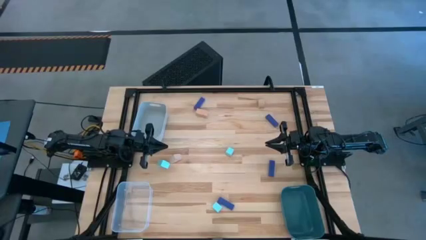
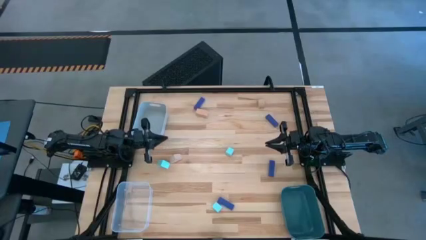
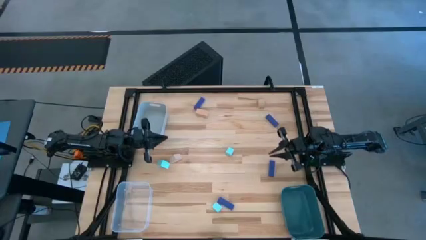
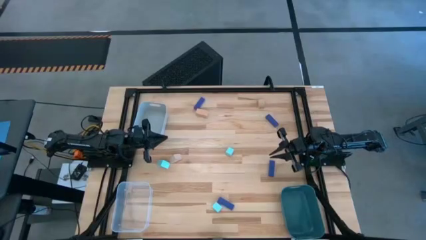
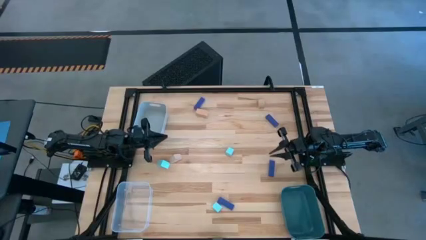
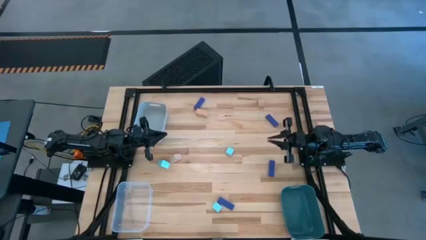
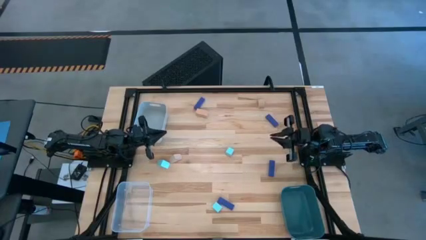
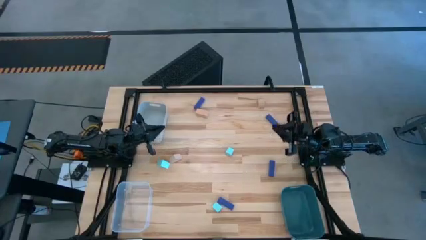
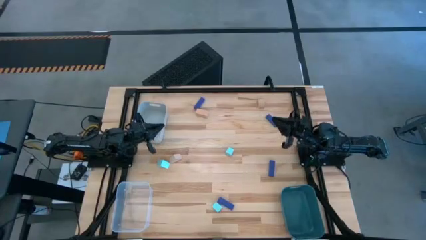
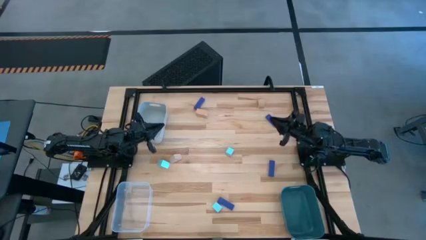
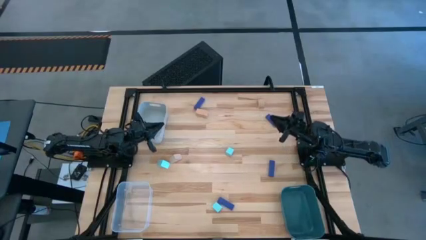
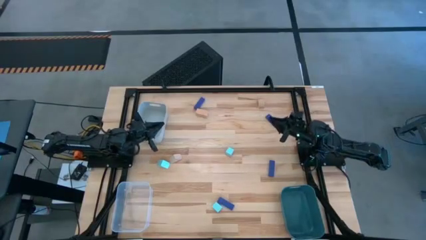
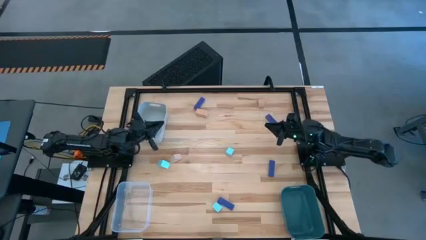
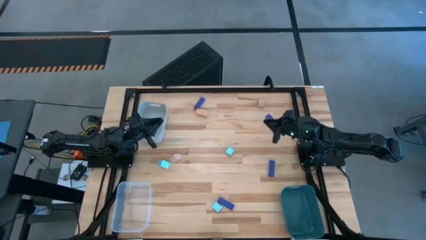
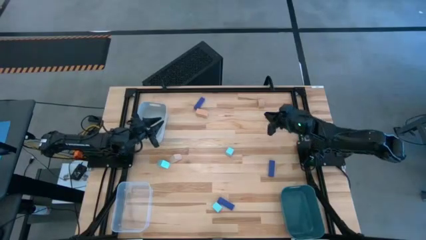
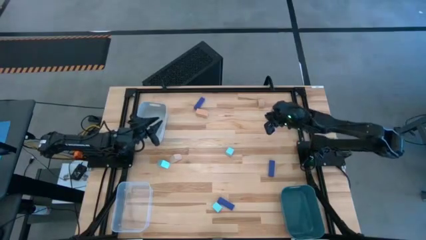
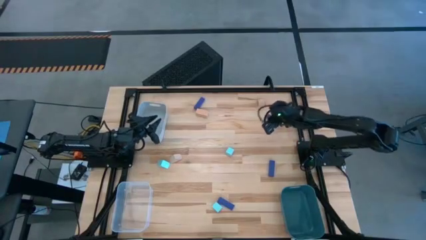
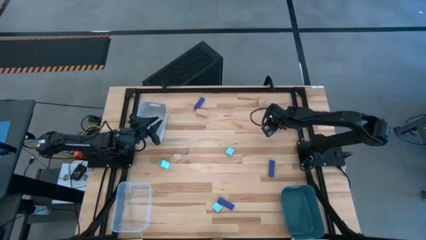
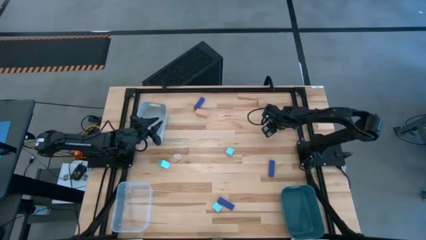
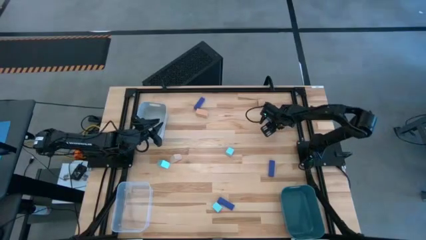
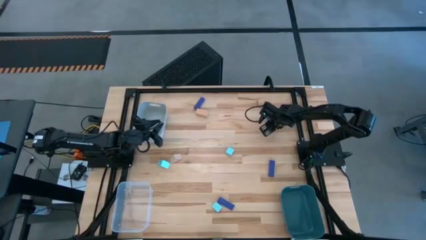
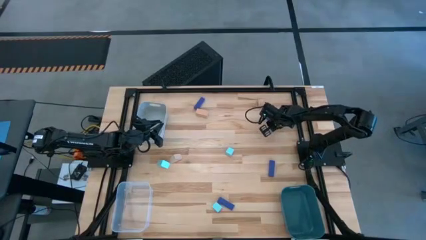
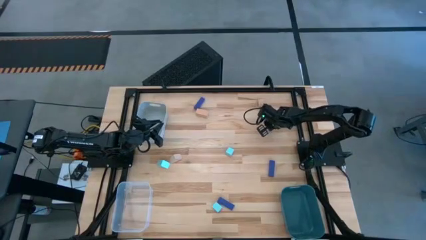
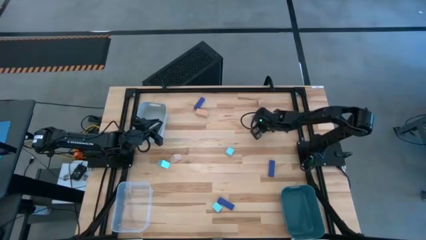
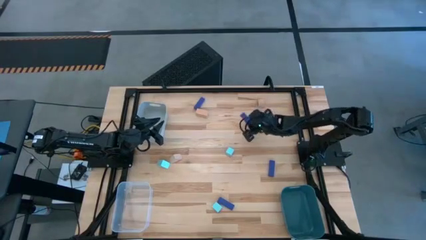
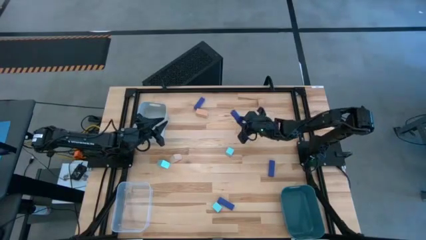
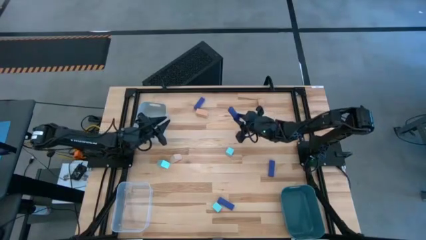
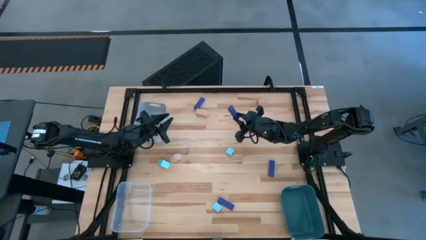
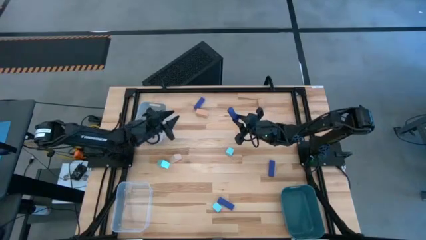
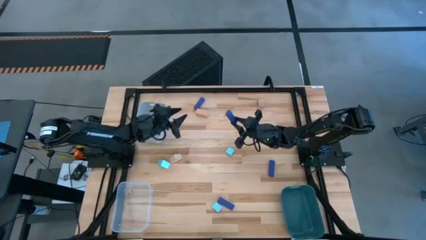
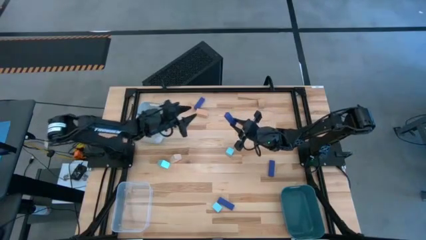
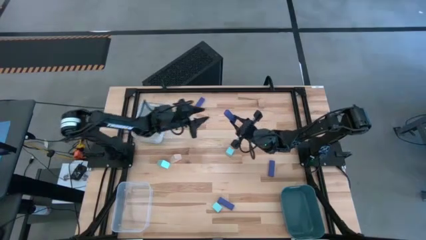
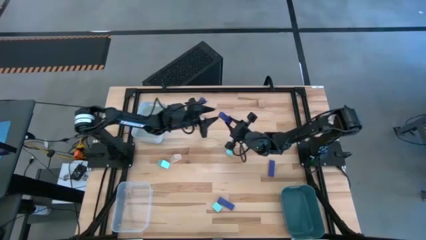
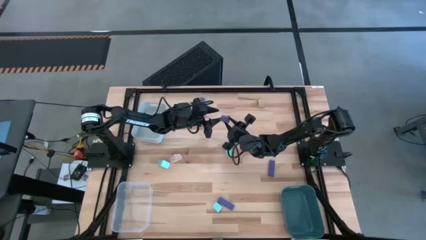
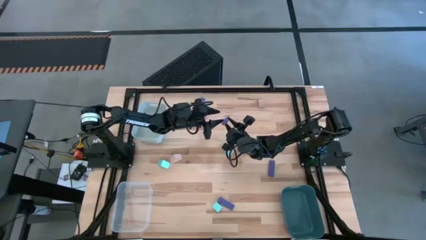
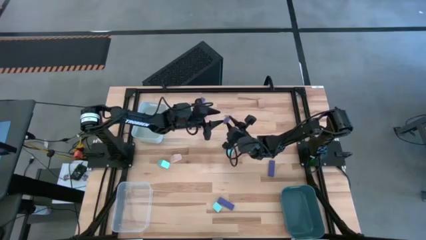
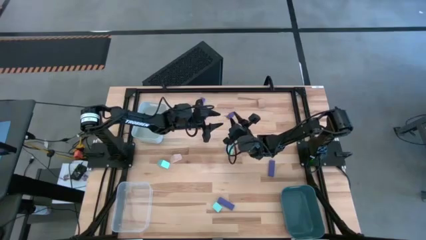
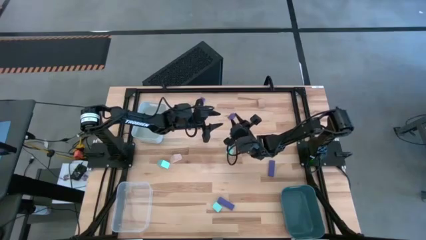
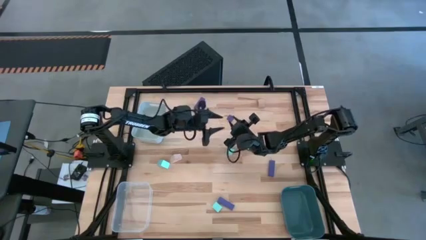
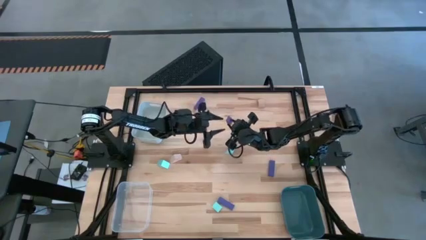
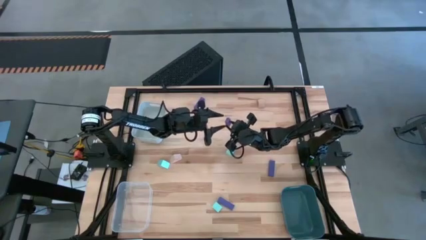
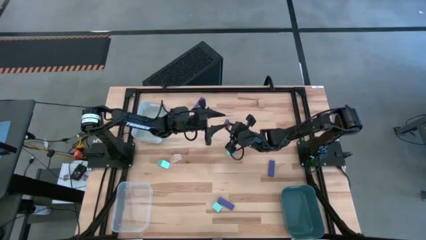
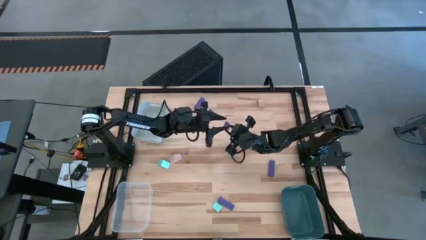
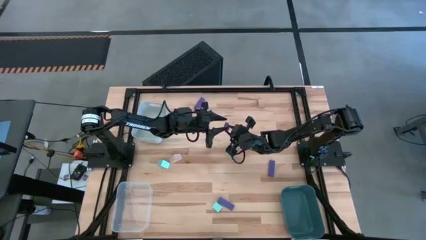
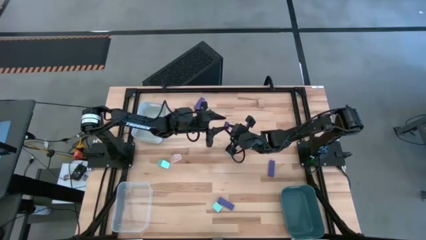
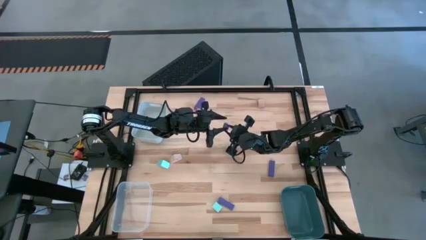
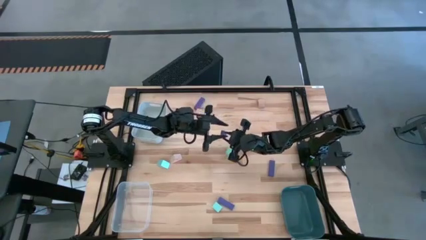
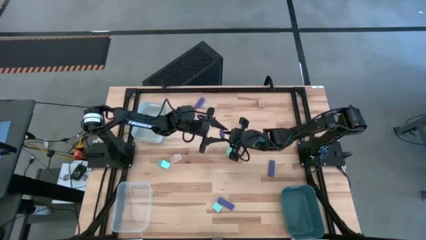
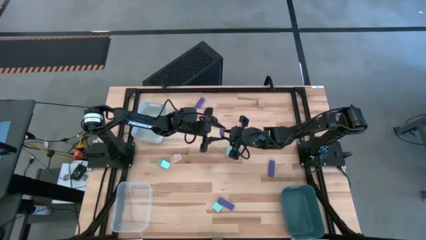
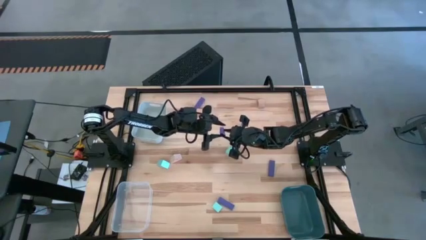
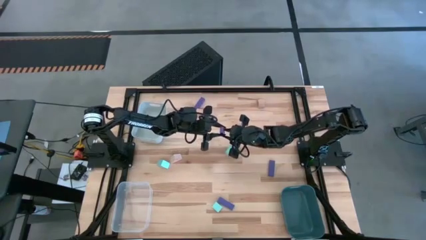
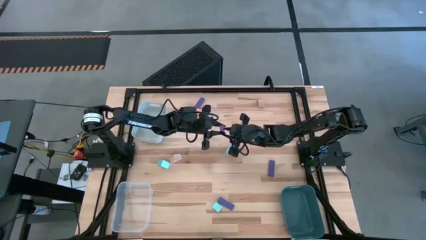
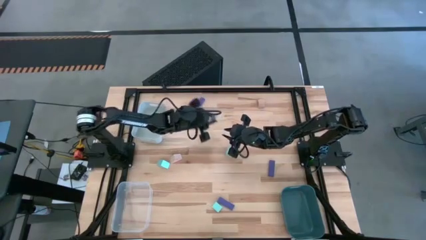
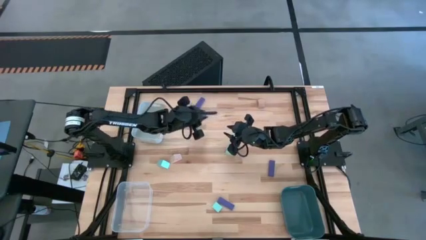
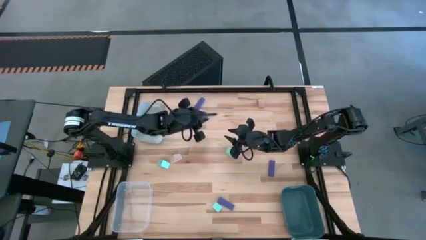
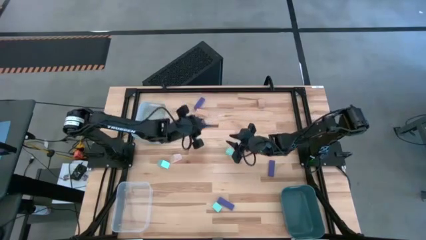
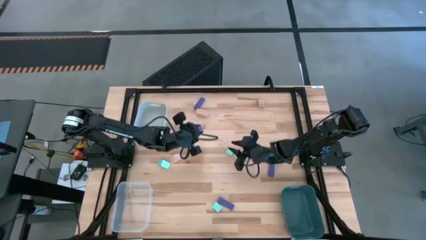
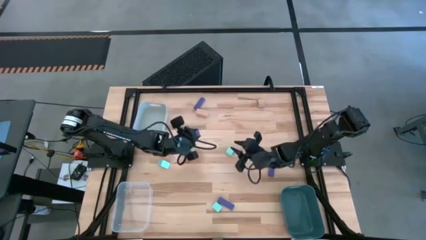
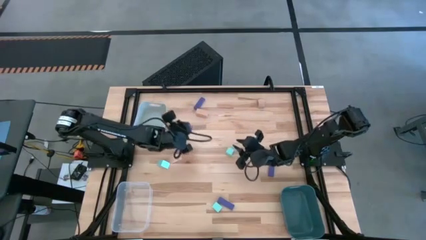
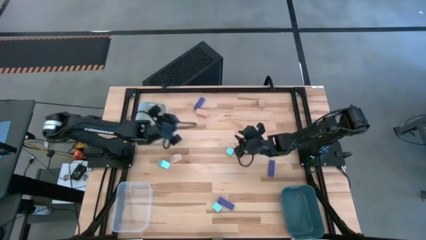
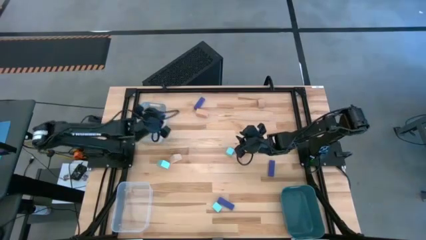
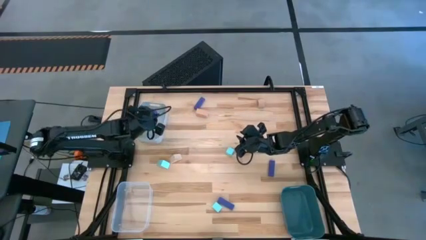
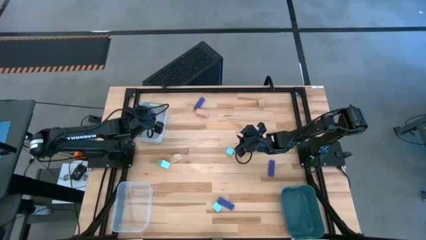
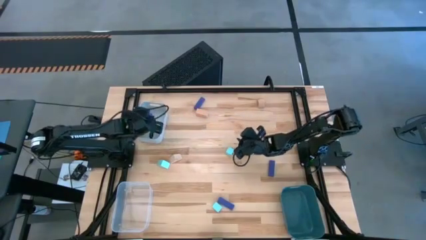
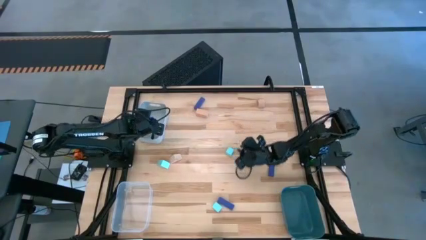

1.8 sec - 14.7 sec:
Task: Sort & place blocks by color
Put the purple block into the gray bin

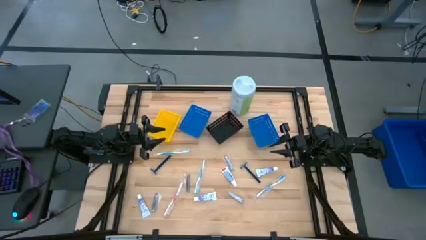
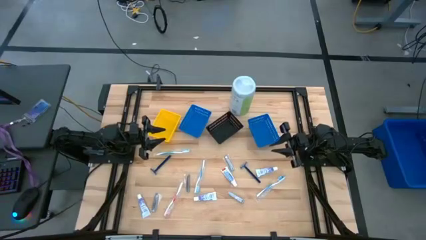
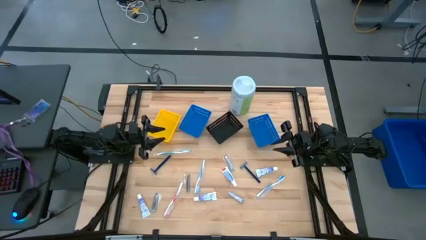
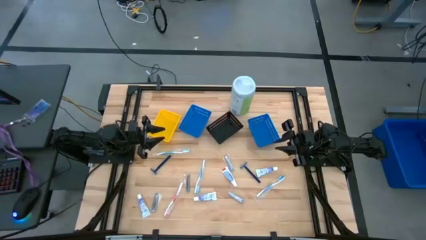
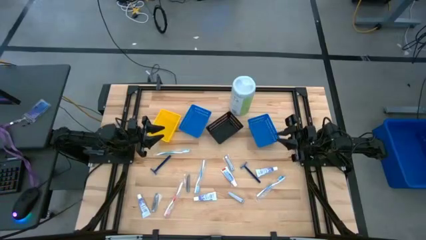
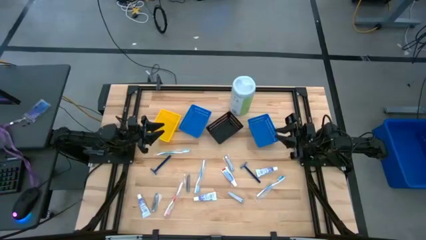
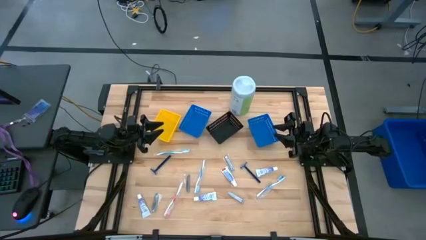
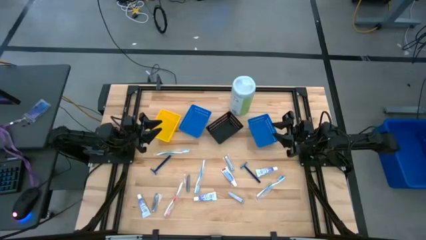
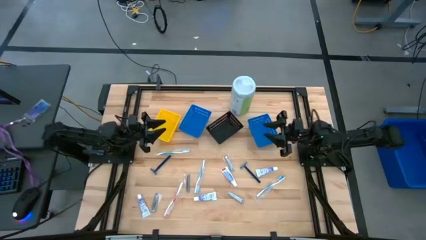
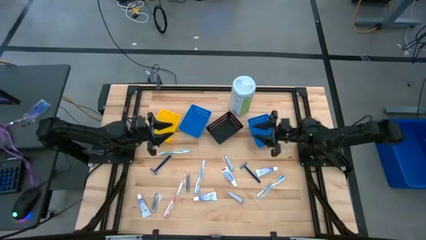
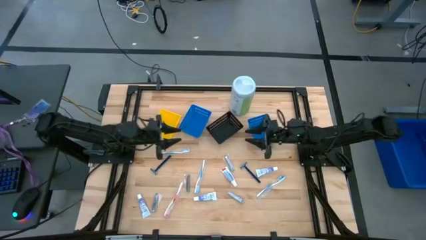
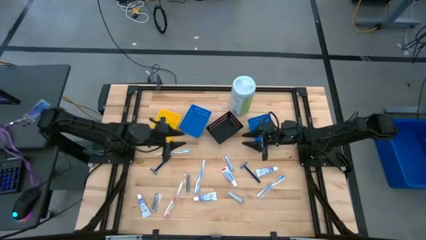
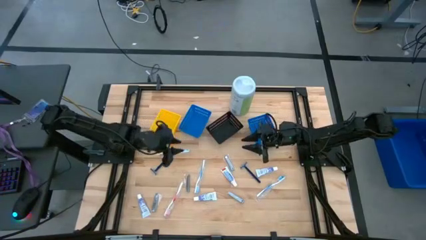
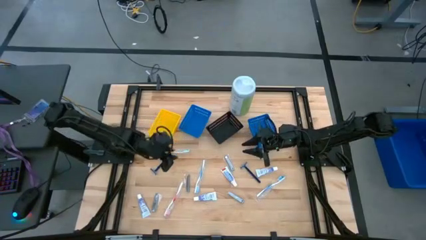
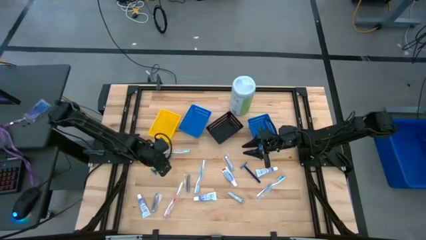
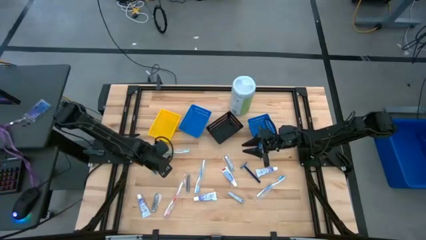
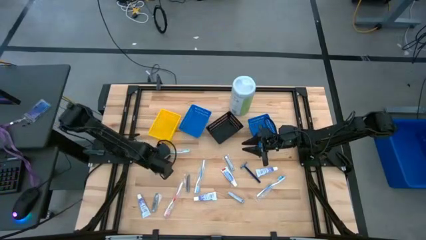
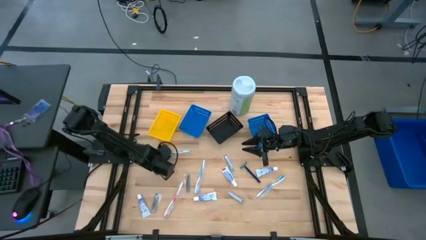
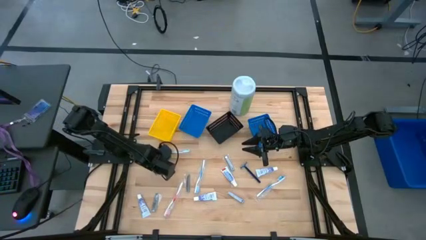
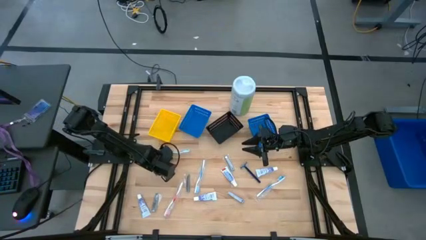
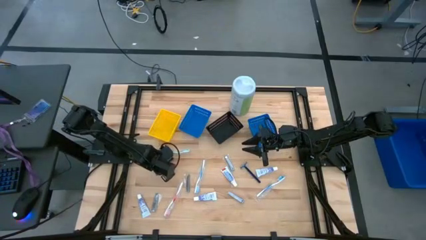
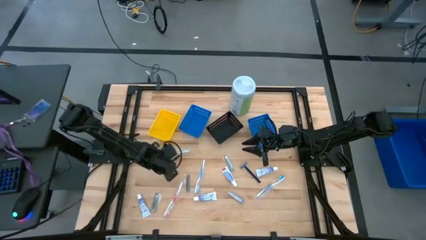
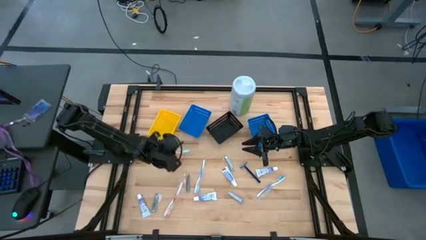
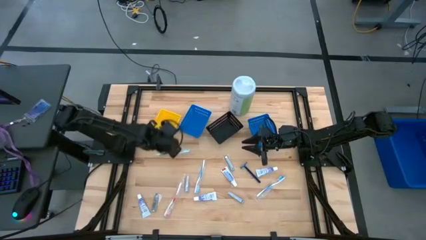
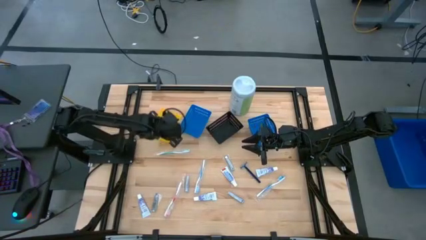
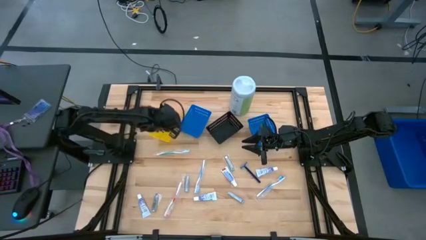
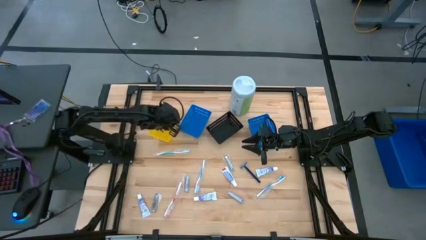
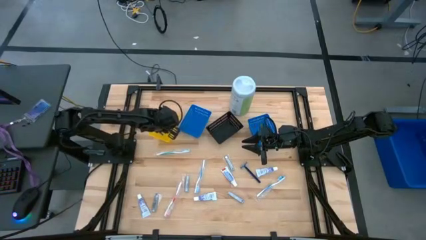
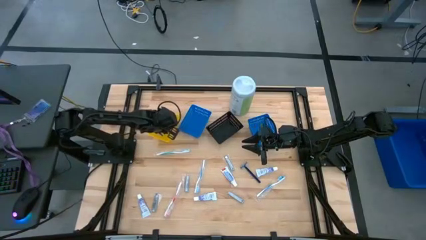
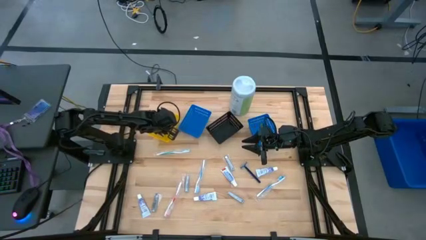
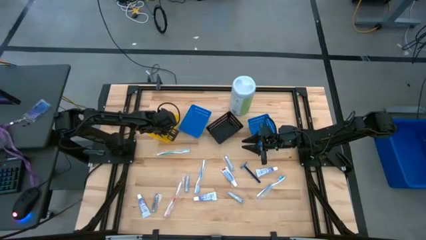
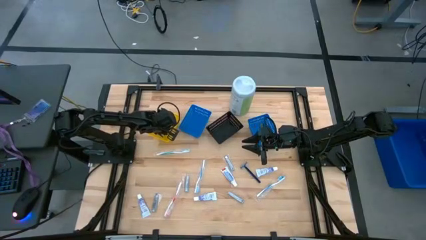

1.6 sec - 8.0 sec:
Task: Pick & Place Travel size toiletries
Put the blue razor into the yellow basket
